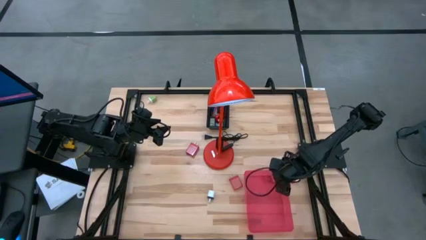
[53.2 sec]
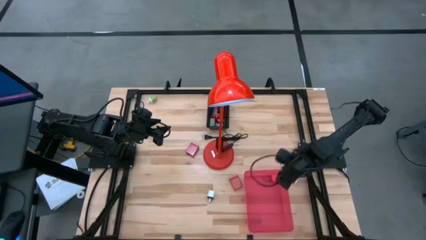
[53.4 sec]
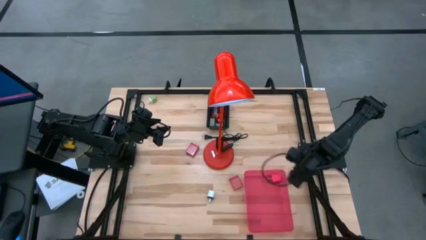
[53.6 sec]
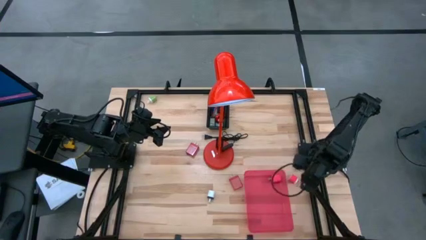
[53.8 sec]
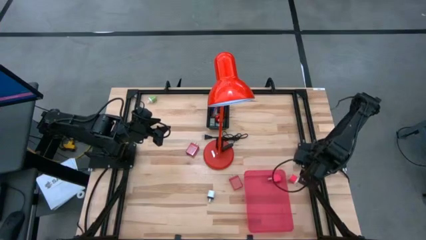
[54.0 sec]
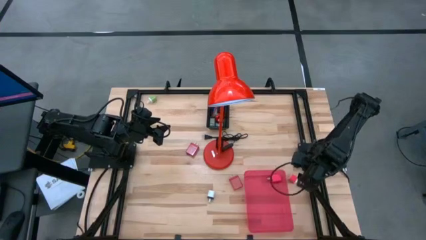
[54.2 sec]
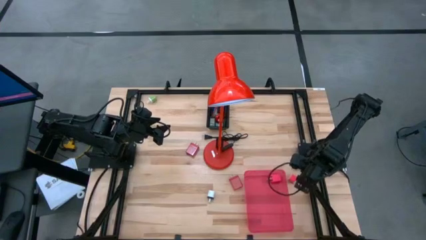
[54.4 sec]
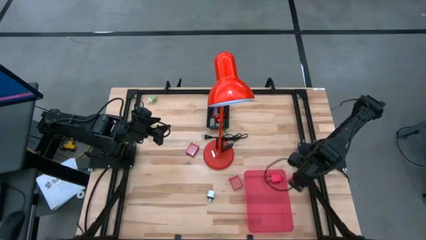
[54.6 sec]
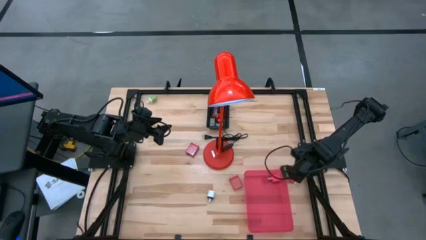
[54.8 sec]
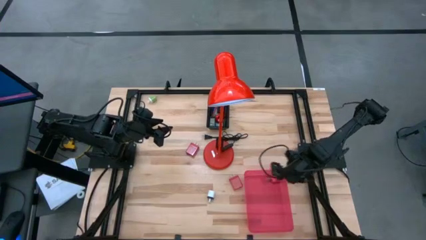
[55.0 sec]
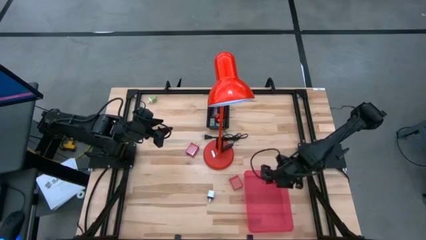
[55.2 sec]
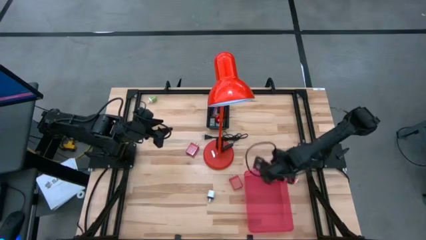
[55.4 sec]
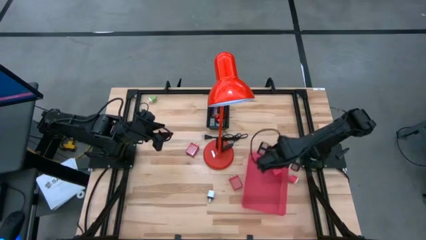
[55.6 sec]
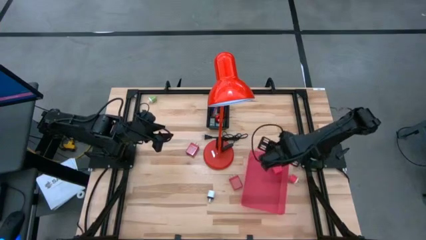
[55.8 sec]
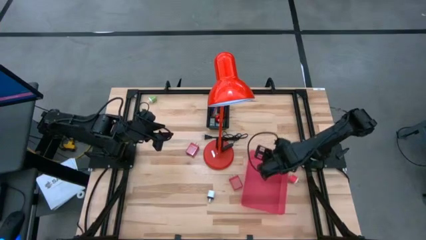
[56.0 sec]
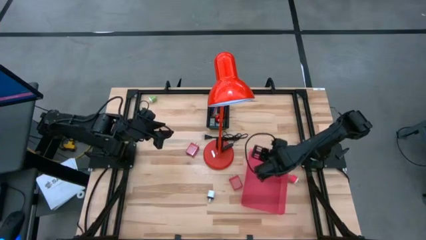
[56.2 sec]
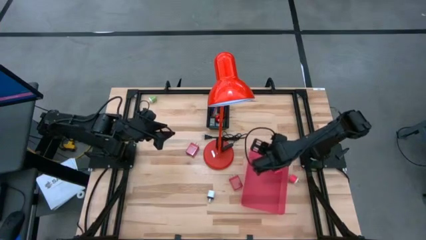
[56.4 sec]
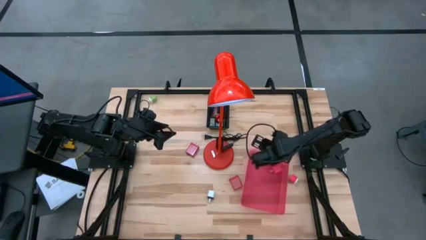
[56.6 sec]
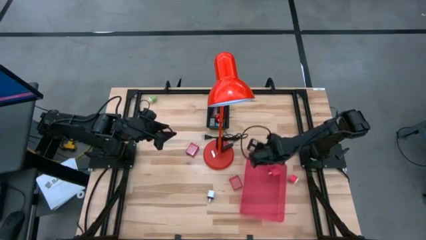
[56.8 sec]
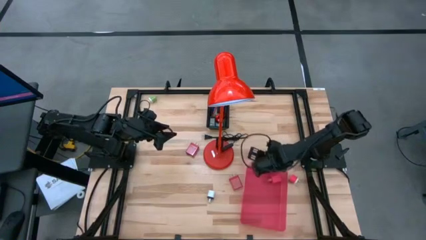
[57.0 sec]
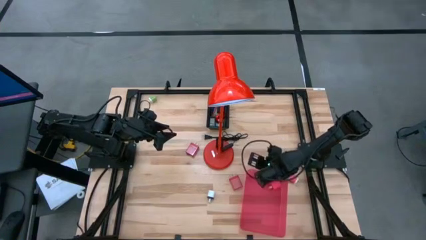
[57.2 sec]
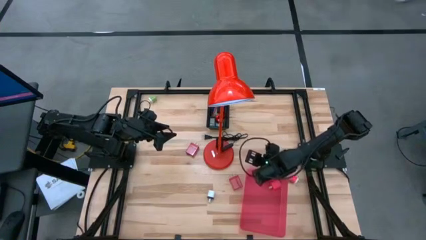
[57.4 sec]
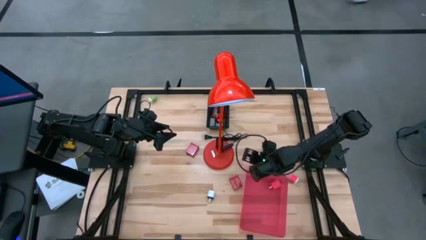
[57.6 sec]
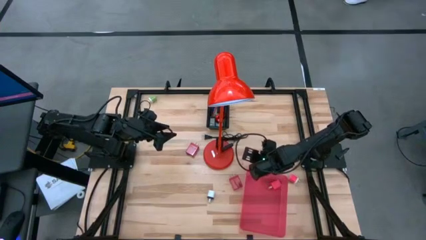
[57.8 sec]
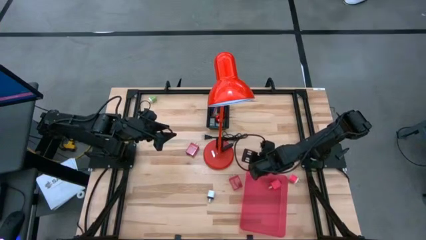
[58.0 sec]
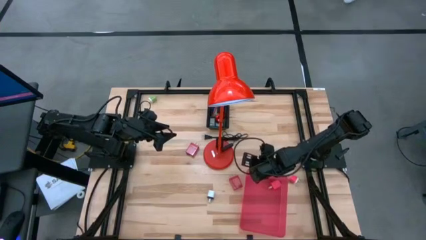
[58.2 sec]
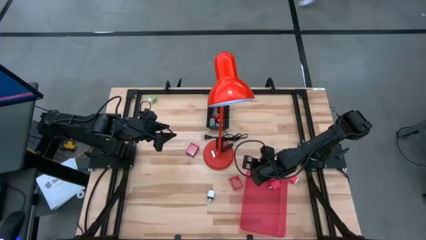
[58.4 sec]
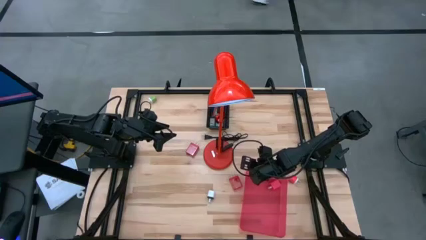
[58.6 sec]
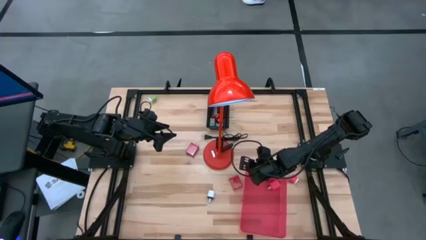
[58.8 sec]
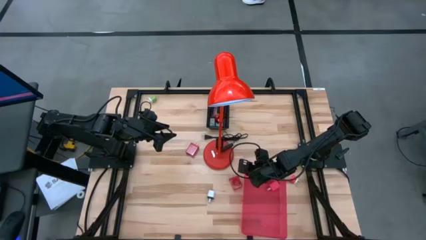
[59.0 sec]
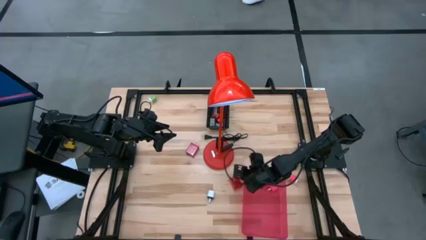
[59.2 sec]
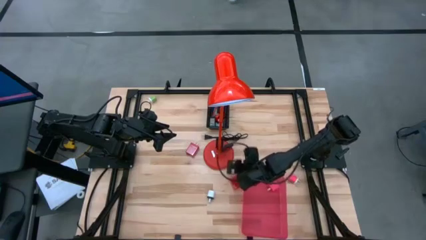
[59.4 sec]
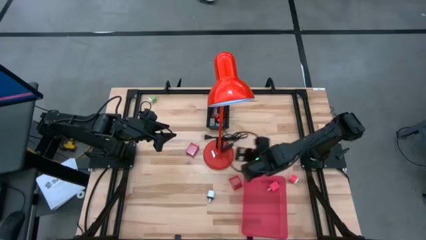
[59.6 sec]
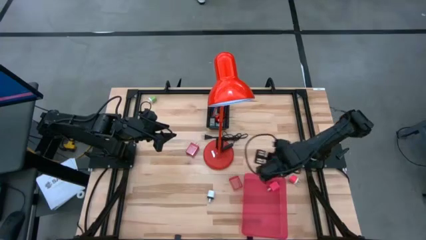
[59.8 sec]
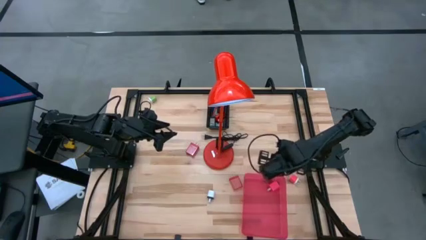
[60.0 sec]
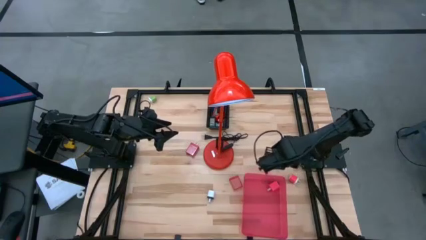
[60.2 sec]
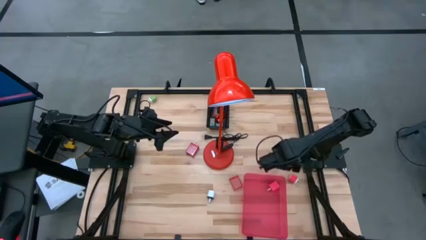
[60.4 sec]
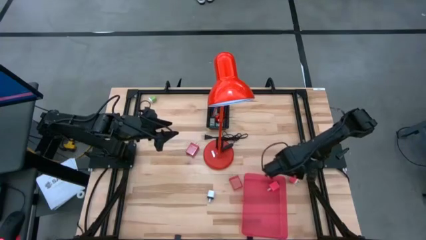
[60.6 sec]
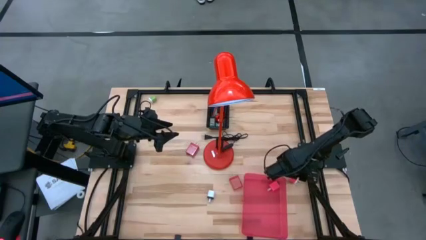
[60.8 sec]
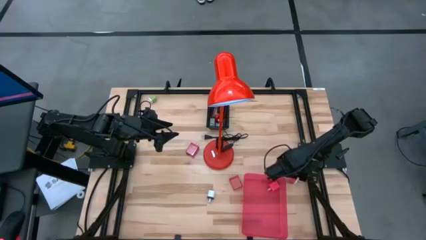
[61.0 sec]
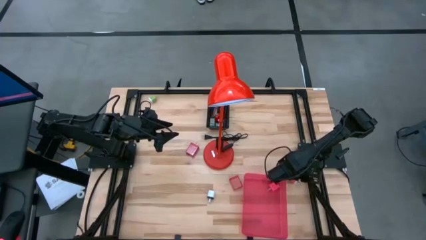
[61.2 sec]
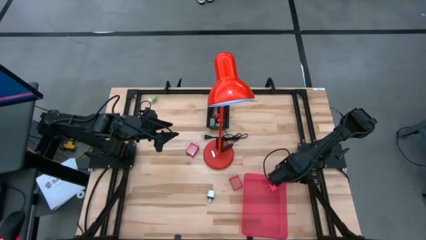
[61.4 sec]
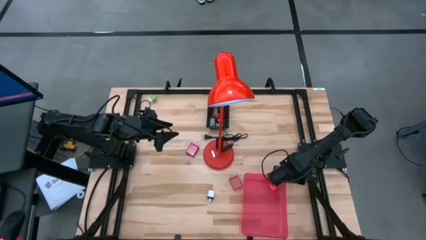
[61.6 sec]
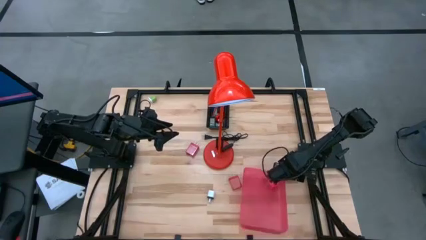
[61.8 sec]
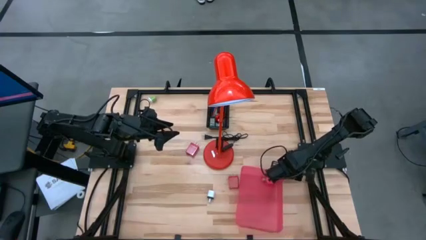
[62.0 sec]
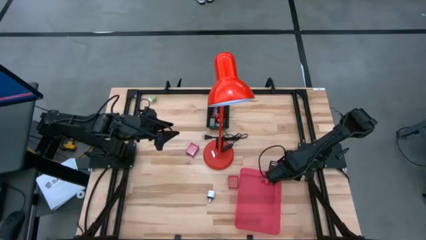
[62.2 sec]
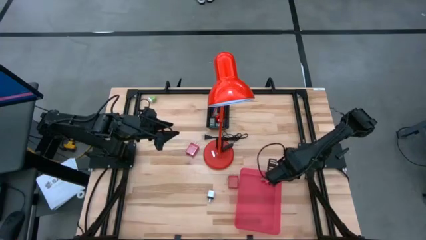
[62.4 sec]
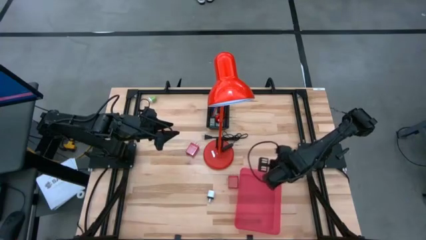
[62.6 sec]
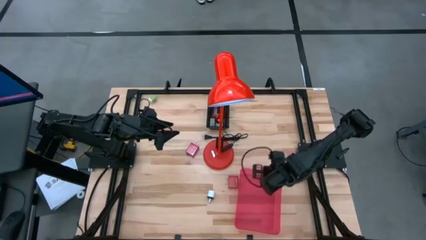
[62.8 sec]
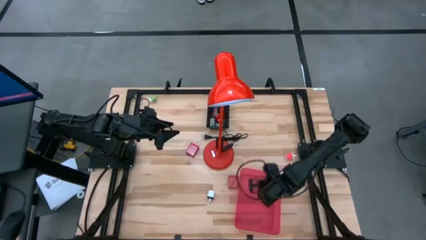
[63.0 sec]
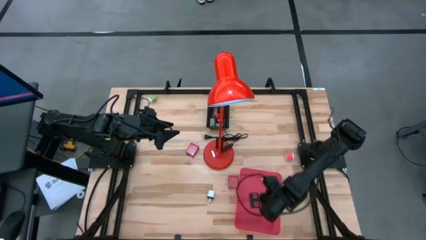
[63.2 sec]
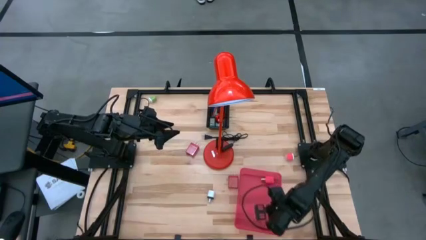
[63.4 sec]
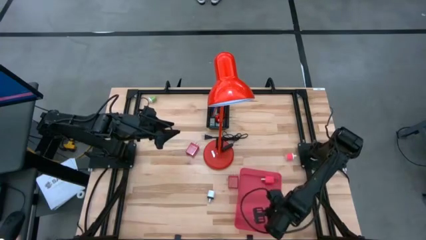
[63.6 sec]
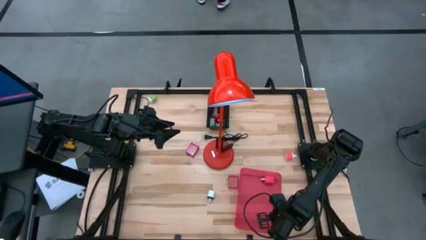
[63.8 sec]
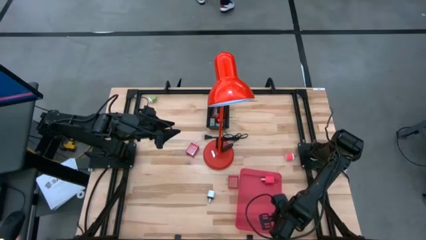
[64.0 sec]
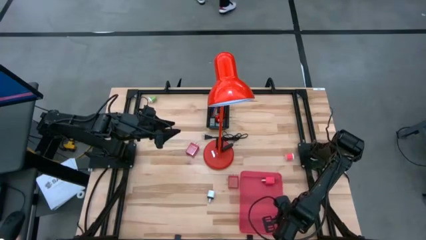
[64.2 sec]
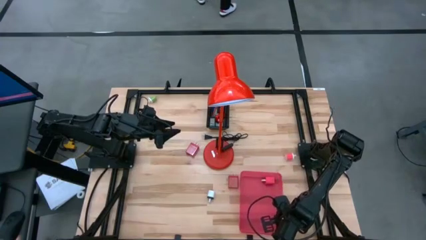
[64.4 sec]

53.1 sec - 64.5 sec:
Task: Pick & Place Office items
Adjust the red bin

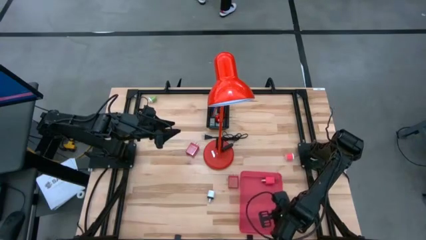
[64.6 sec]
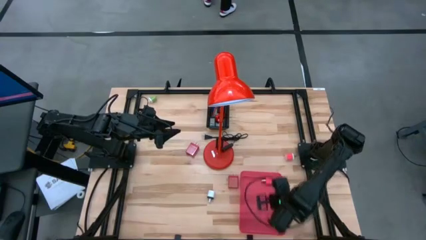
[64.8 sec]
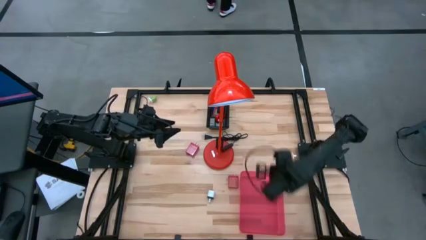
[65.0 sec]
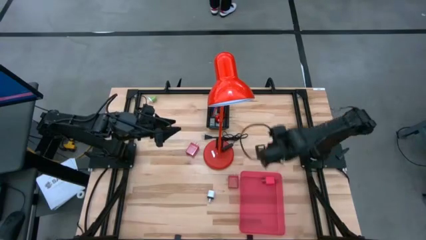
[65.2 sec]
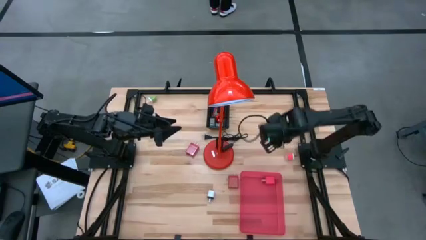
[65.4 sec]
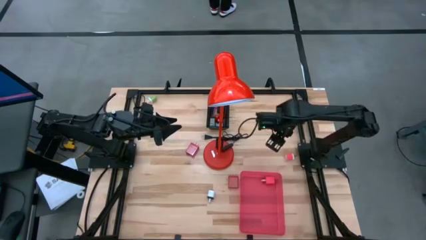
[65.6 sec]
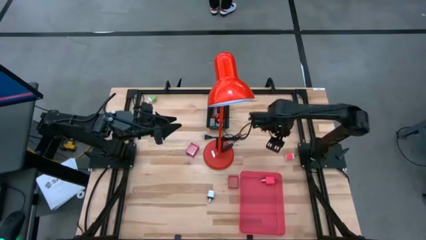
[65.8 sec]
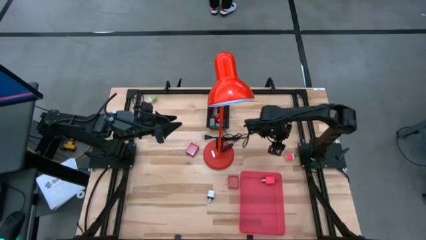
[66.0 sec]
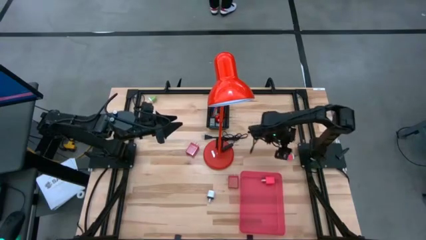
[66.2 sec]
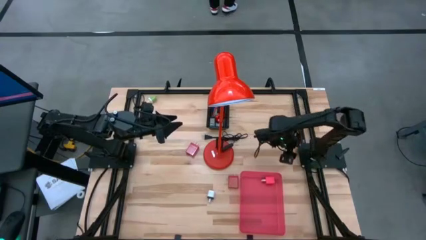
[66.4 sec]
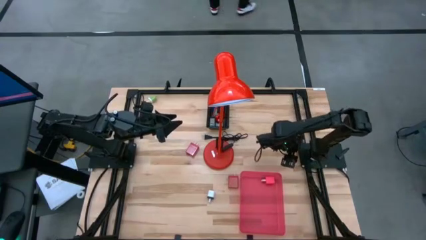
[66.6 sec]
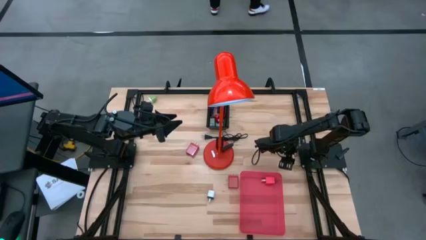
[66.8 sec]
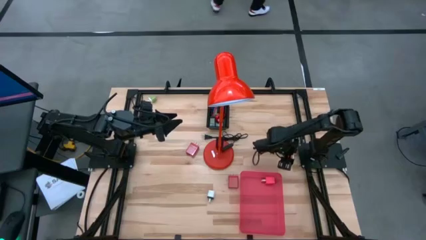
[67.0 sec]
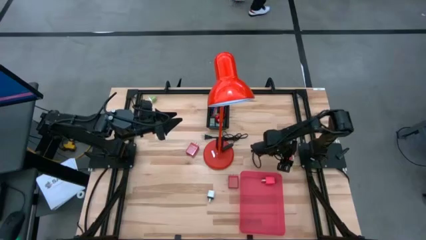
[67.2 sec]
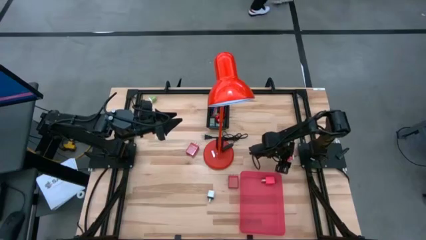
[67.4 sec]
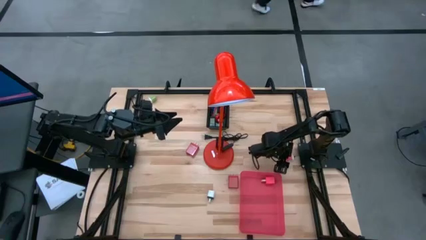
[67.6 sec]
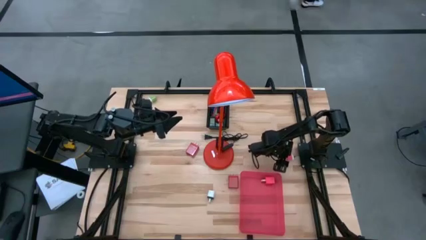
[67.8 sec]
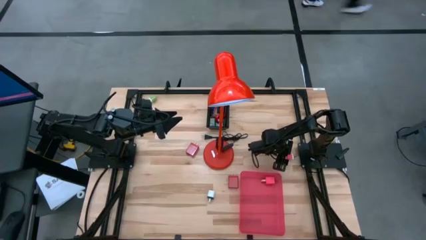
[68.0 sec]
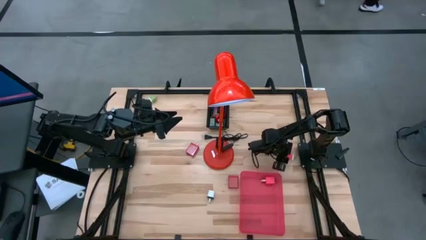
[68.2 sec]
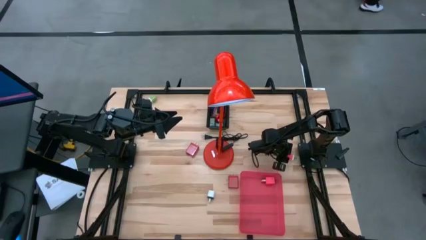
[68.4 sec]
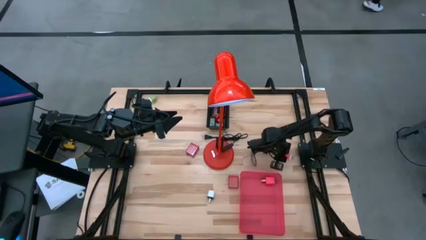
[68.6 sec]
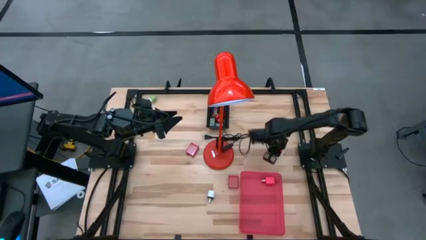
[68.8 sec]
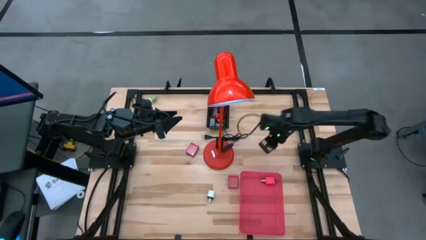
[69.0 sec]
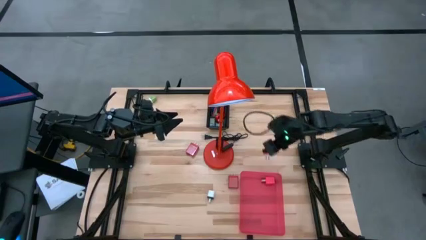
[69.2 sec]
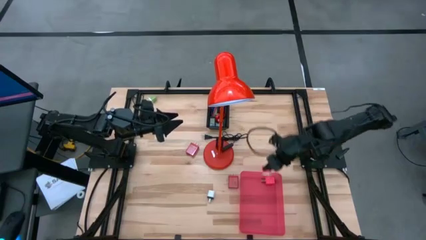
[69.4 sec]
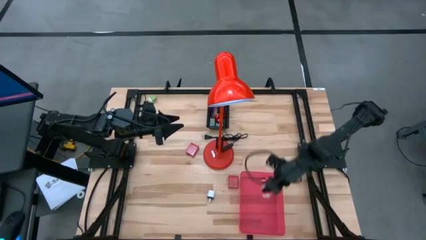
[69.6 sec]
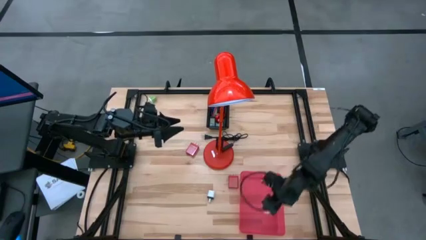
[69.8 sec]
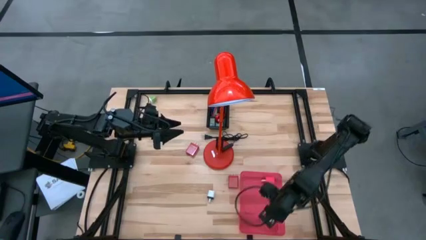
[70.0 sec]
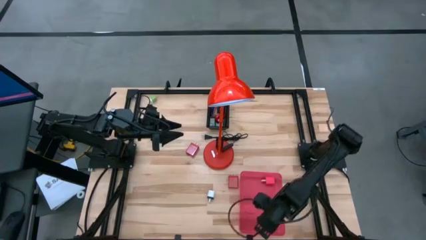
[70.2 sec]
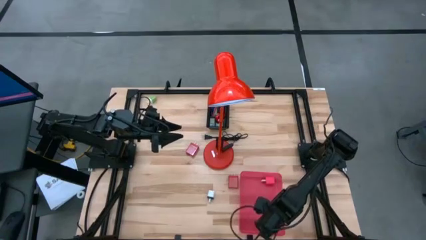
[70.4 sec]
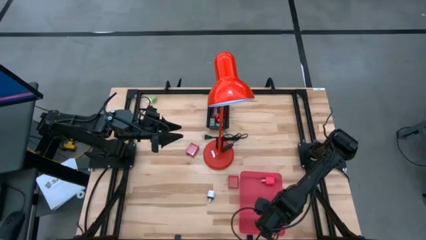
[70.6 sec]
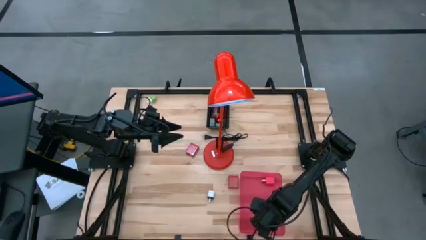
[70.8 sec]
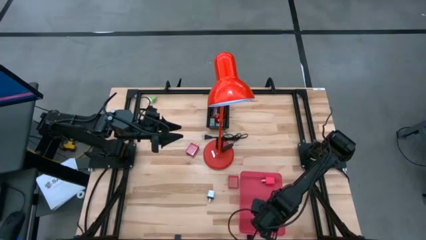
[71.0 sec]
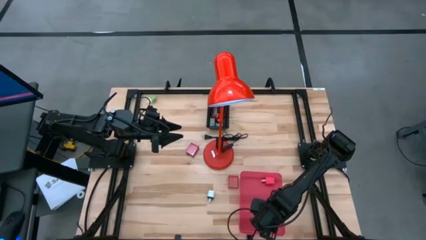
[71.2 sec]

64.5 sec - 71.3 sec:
Put the white and pink charger adapter into the red bin
